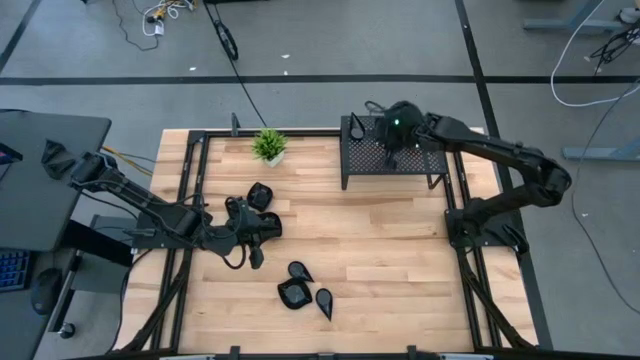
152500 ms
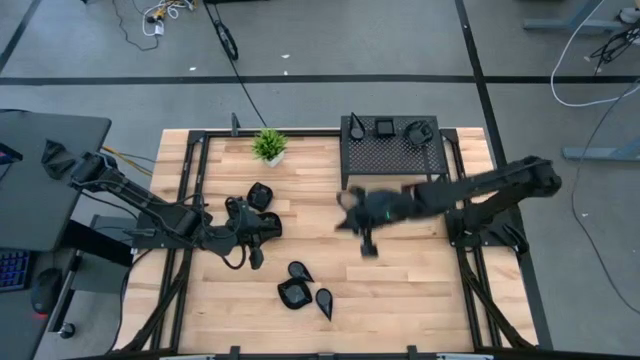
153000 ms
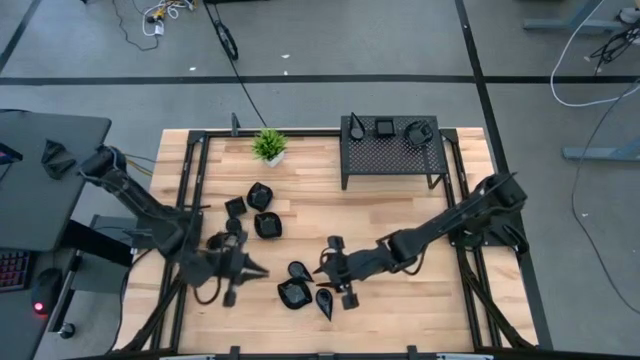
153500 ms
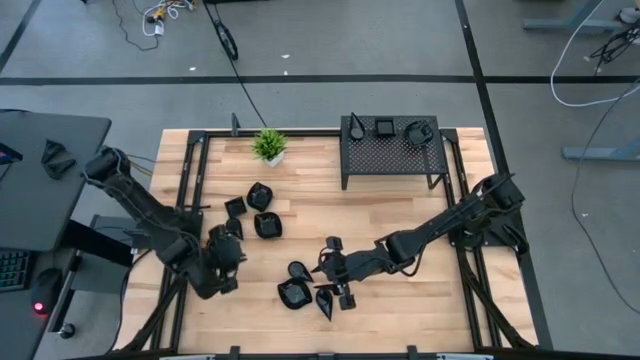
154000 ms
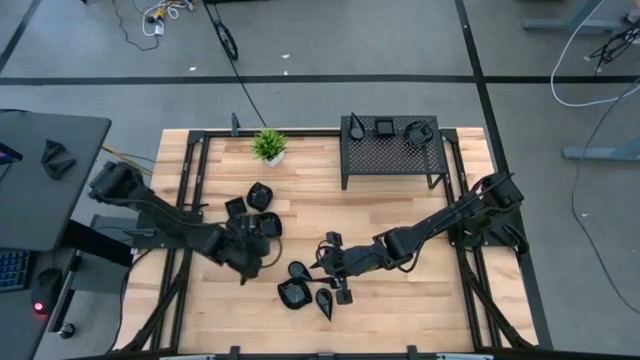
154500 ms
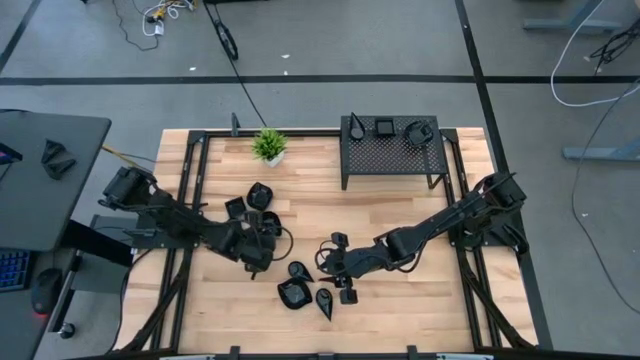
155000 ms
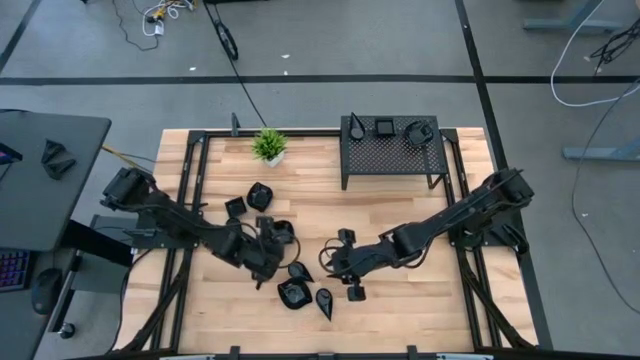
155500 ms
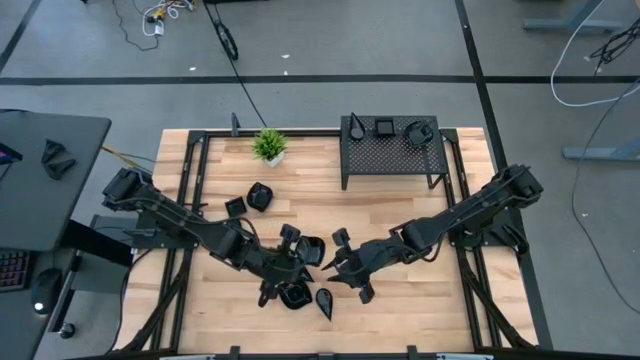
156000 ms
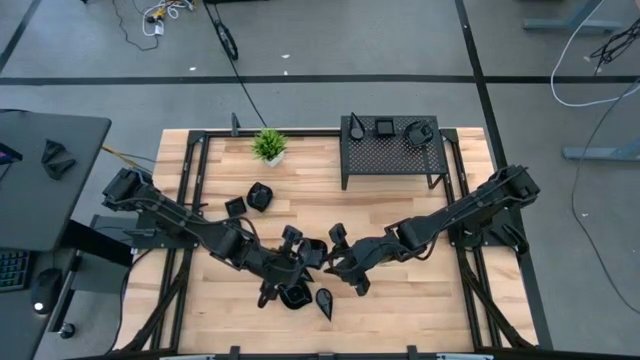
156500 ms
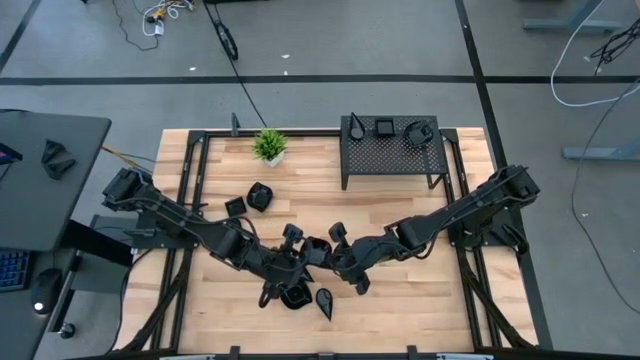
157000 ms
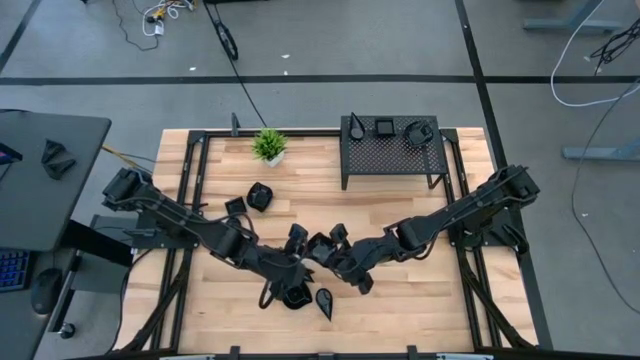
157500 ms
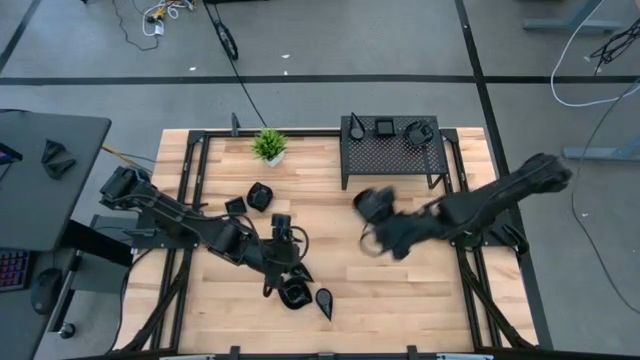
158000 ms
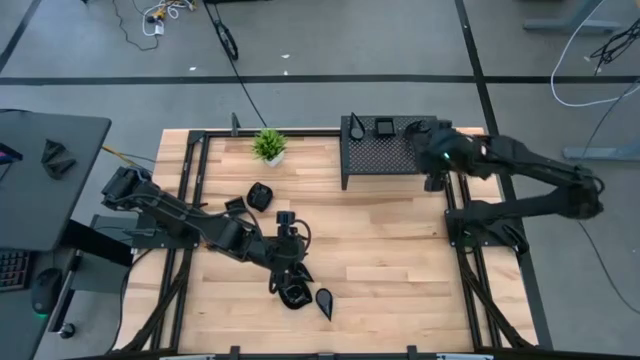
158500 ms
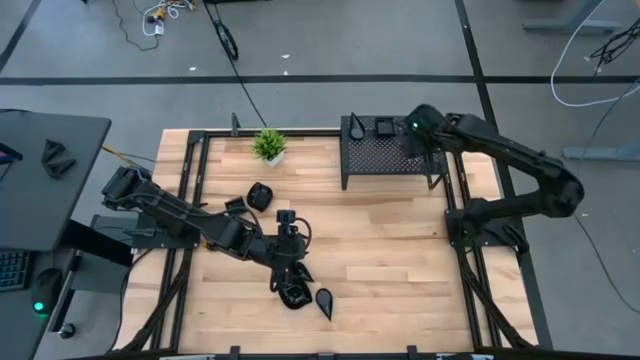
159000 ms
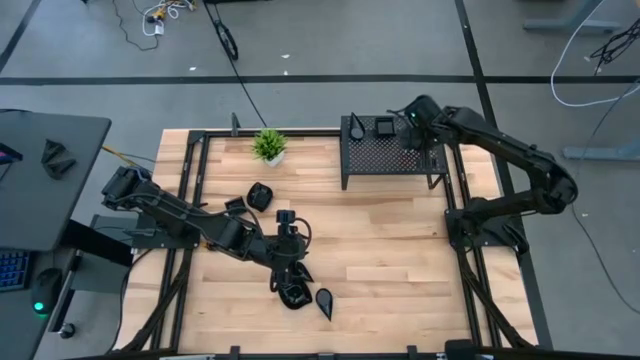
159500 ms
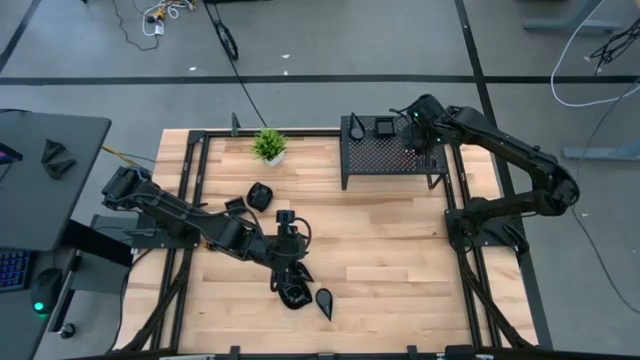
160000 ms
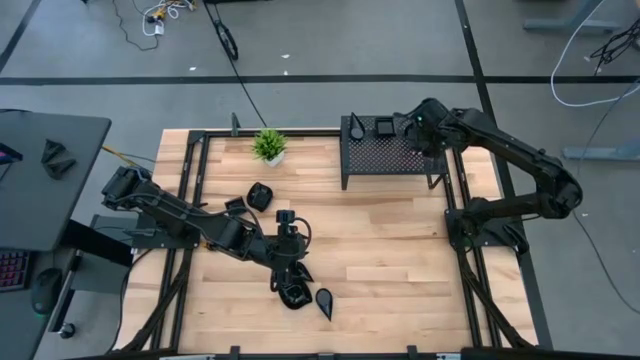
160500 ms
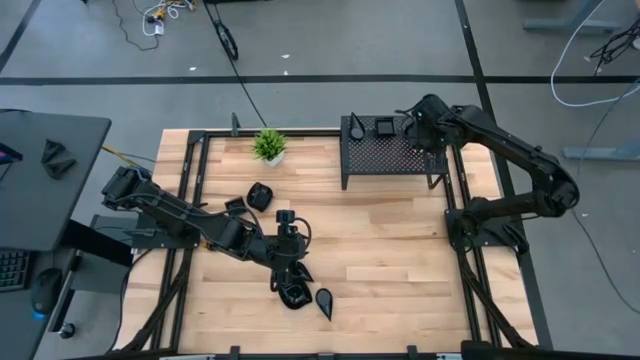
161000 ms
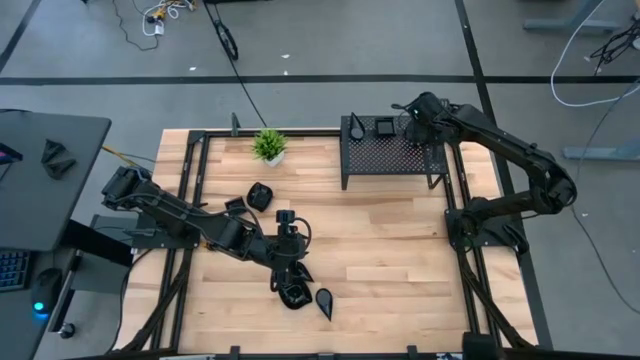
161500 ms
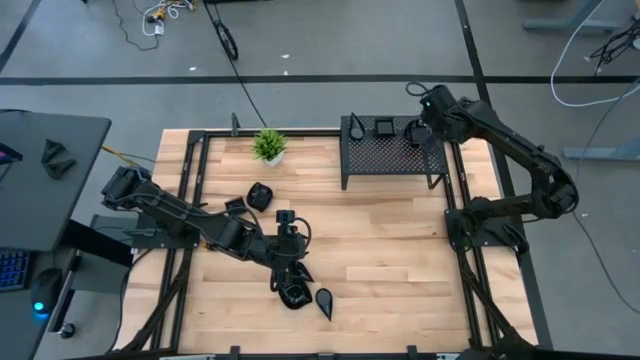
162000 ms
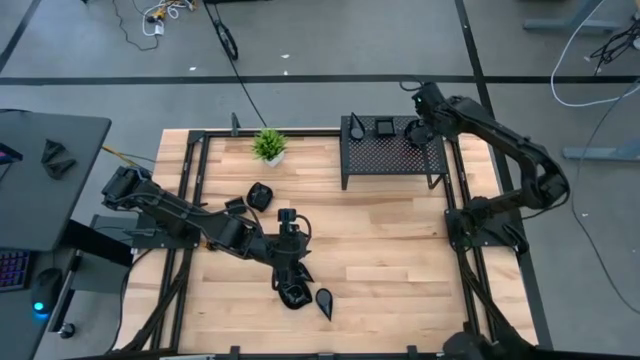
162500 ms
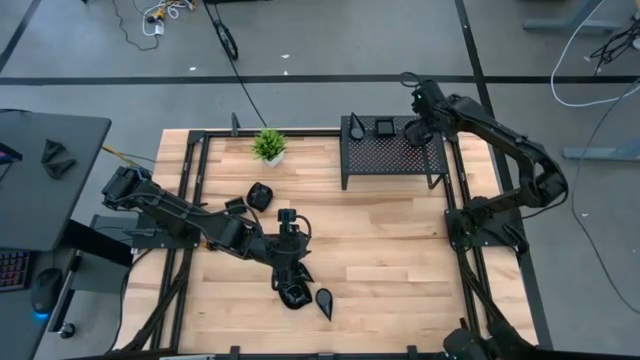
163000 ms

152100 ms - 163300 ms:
Task: Pick & Place Mini shaped plates
Stack the black leaf-shaped plate on top of the black leaf-shaped plate on the shelf

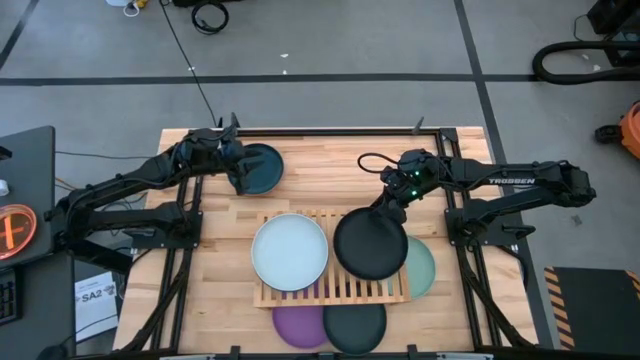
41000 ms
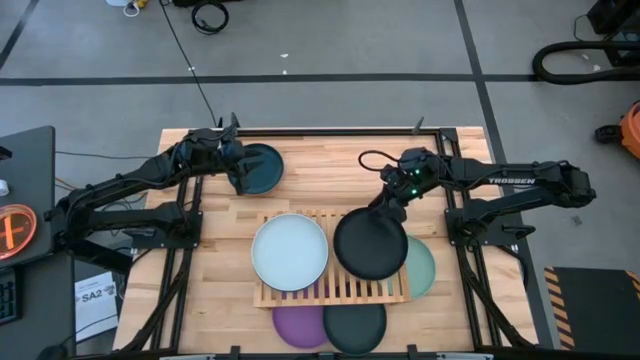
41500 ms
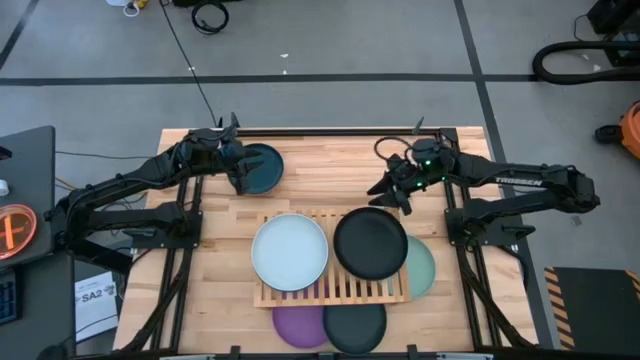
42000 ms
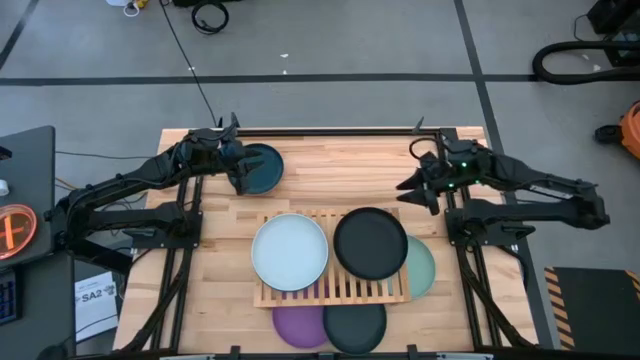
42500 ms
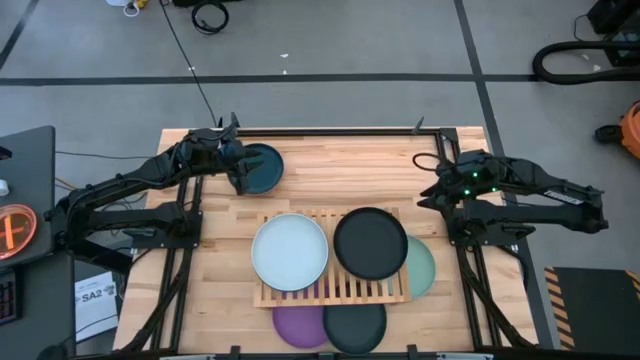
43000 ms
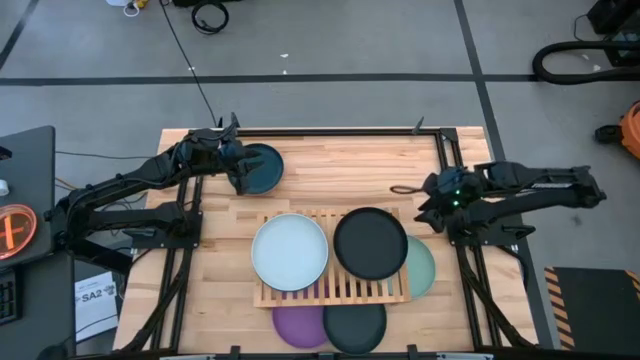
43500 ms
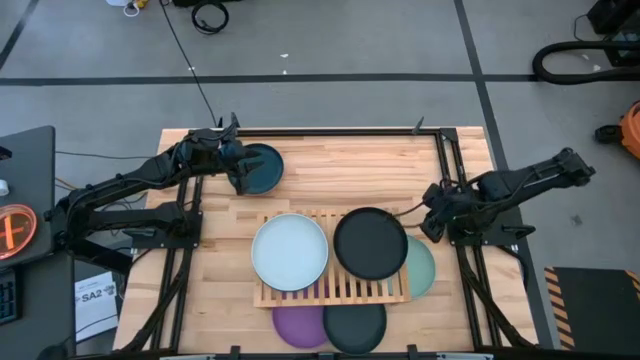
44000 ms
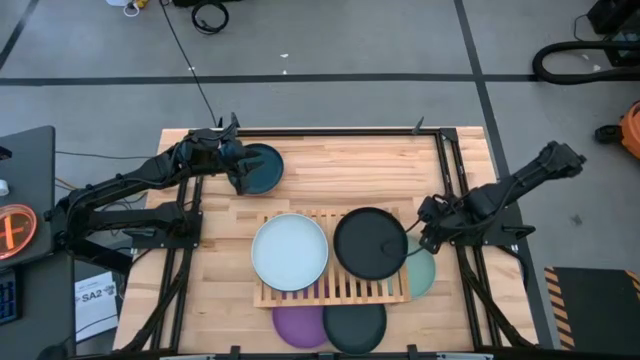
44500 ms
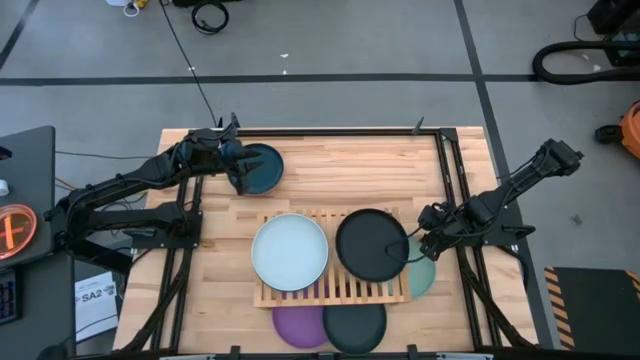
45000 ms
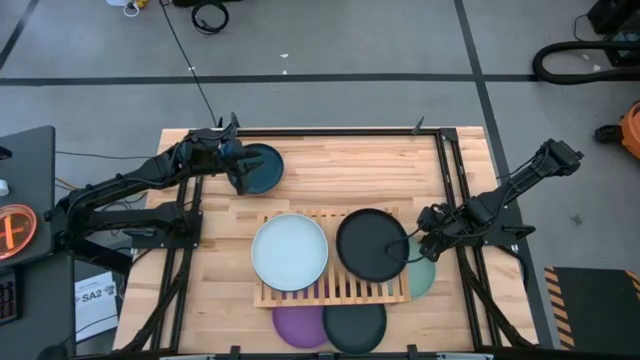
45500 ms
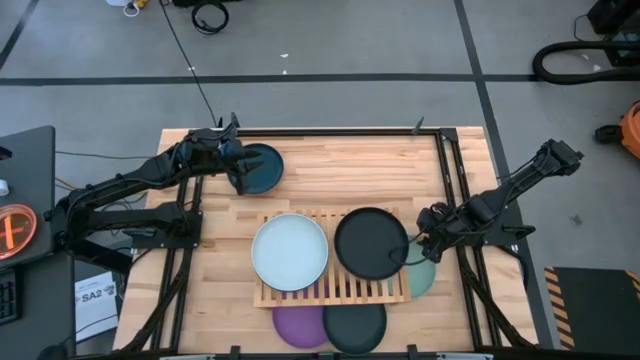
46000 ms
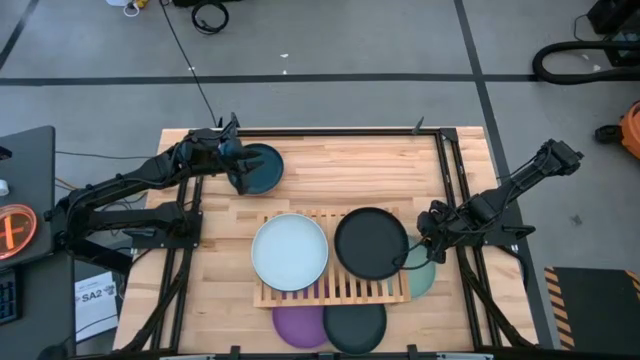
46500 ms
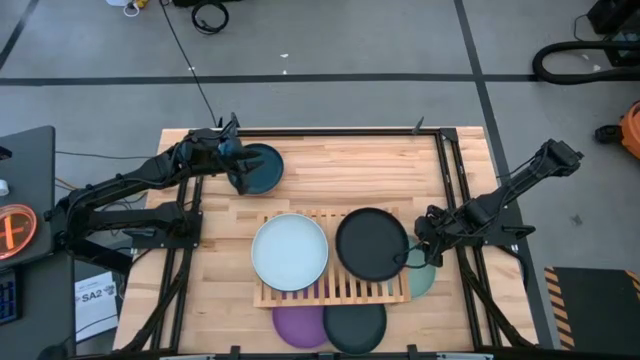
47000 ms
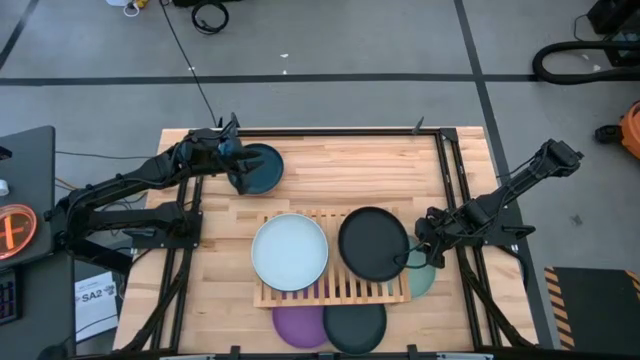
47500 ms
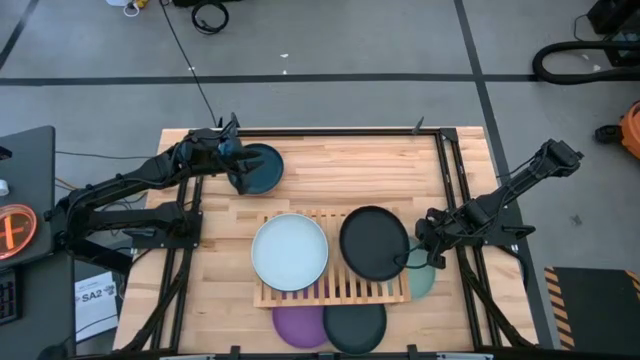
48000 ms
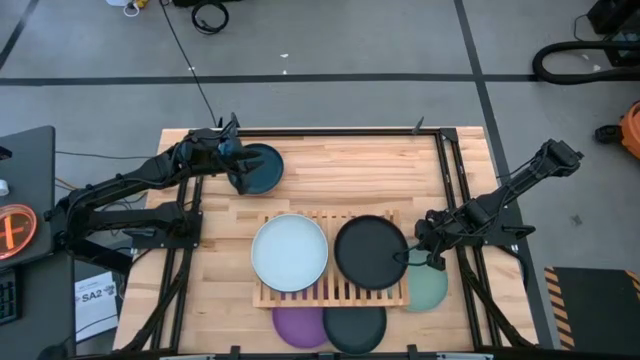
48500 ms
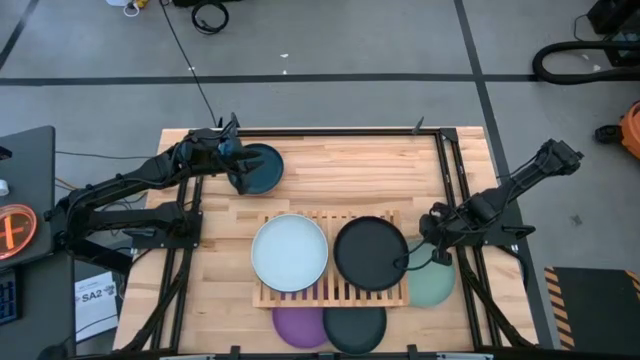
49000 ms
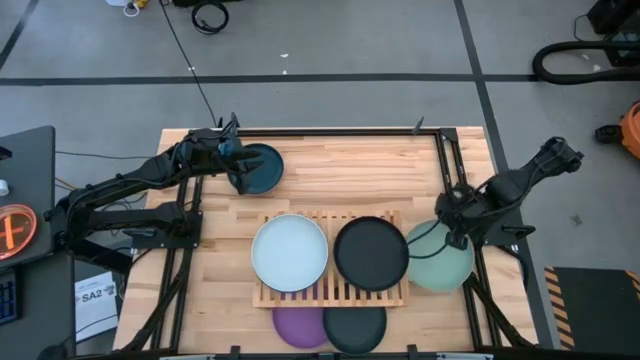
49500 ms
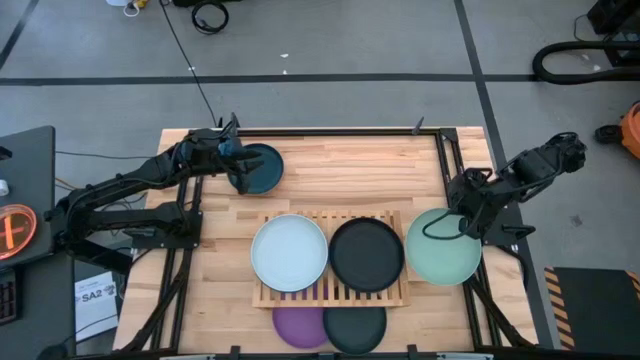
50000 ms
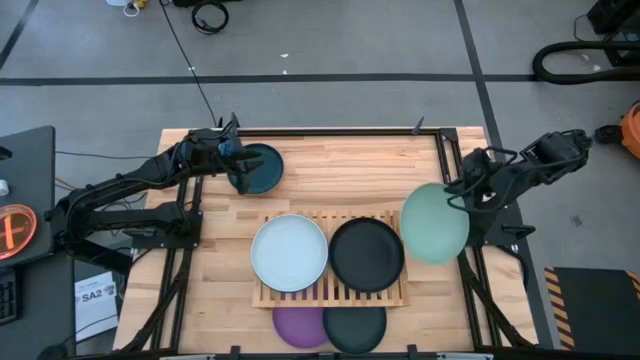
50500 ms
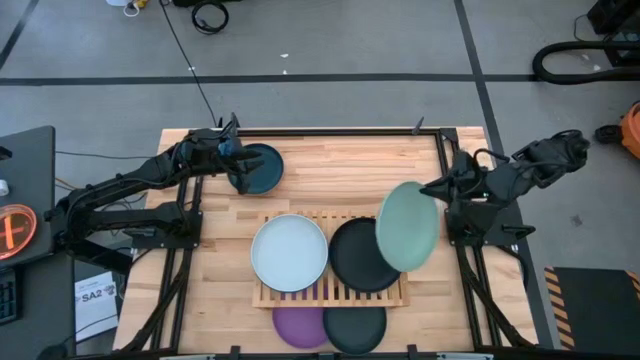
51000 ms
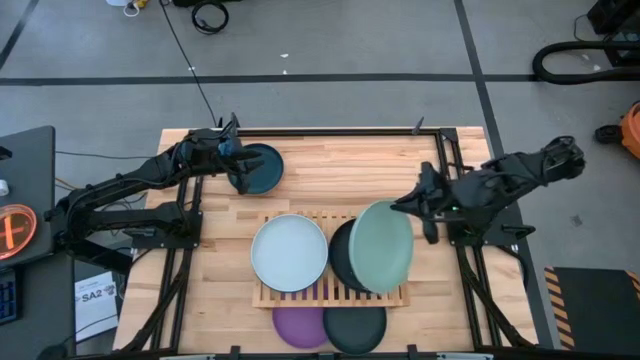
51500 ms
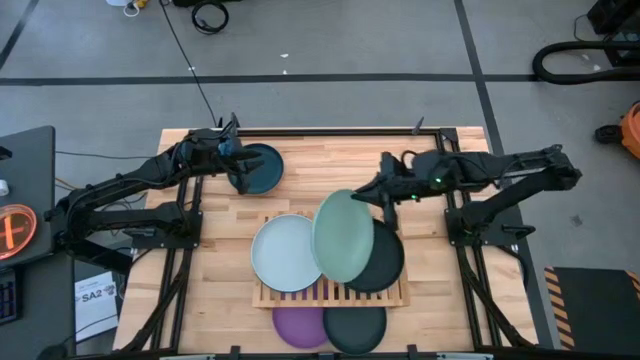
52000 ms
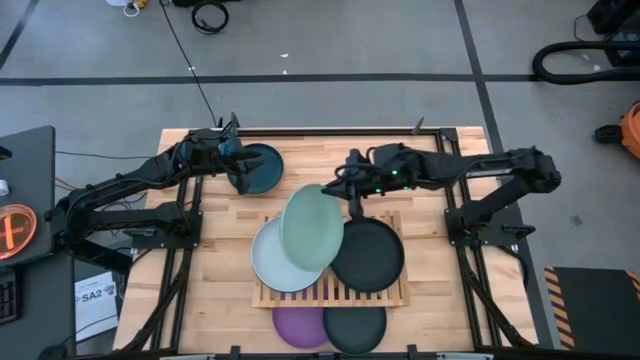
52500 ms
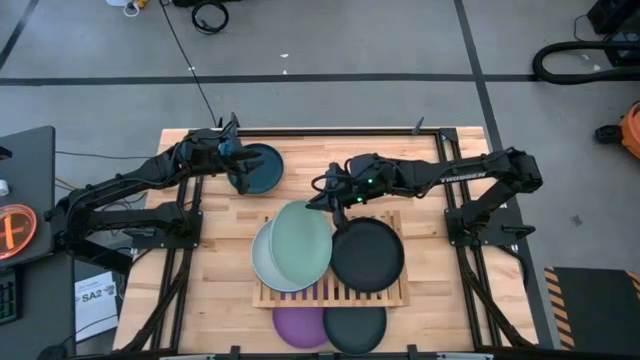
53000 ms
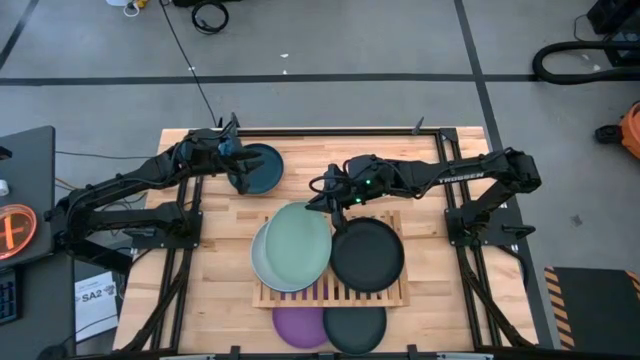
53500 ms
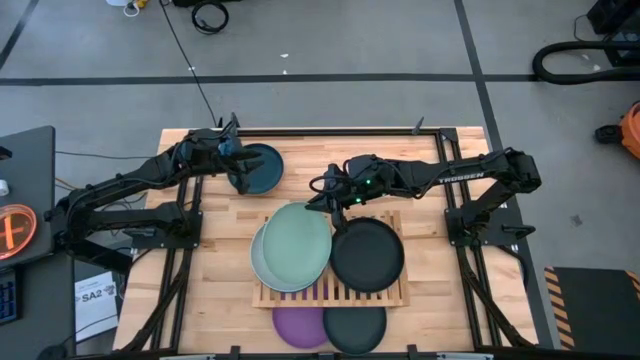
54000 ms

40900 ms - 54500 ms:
Task: Place and stack plates onto a shelf
Stack the light green plate on top of the gray plate on the shelf
